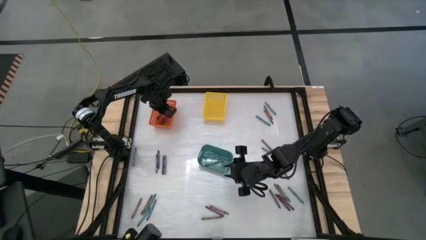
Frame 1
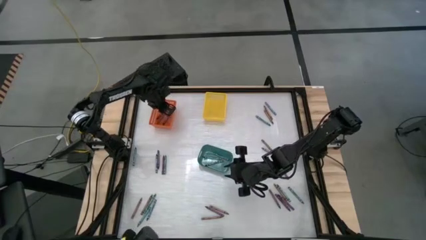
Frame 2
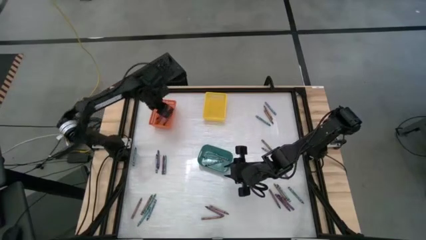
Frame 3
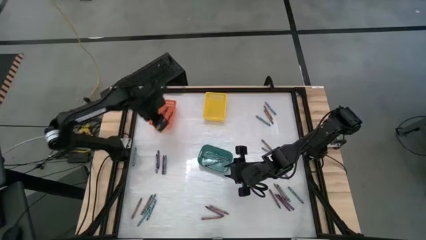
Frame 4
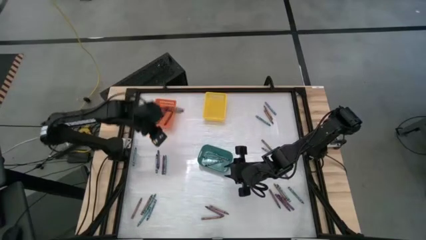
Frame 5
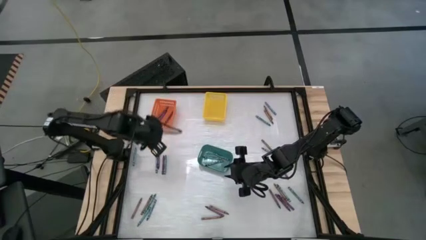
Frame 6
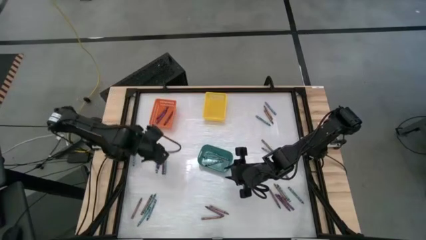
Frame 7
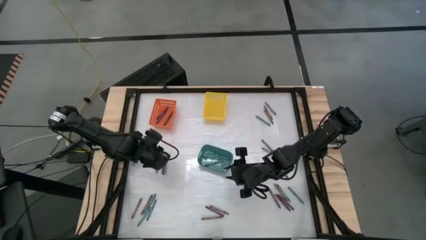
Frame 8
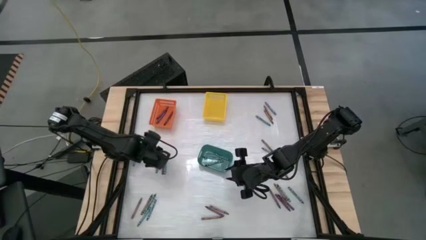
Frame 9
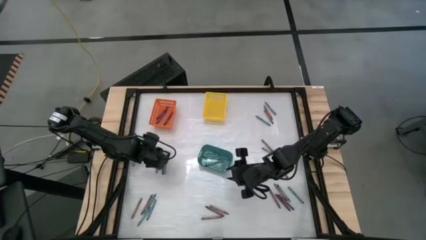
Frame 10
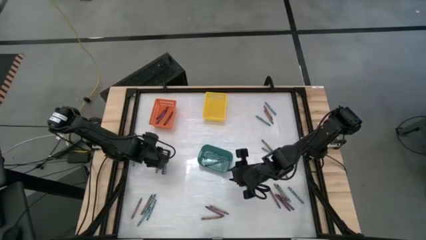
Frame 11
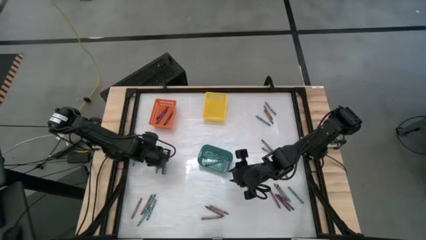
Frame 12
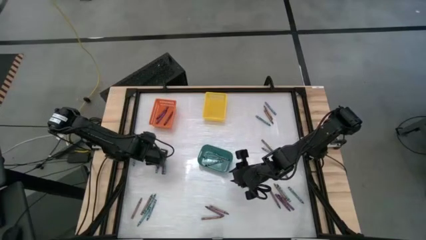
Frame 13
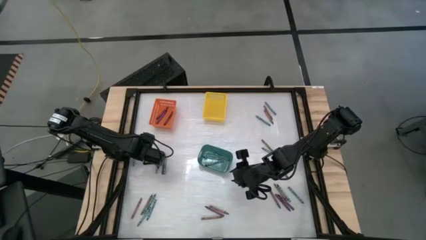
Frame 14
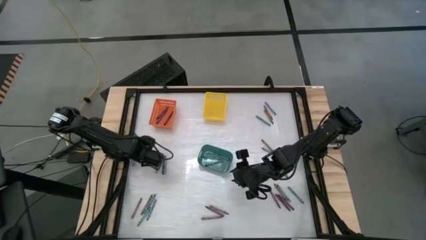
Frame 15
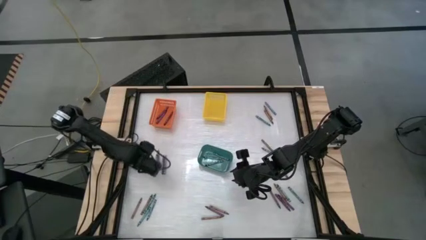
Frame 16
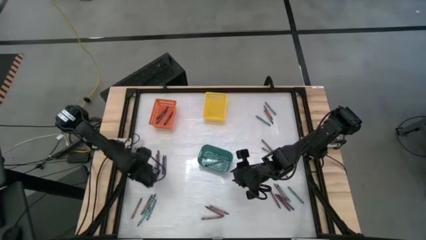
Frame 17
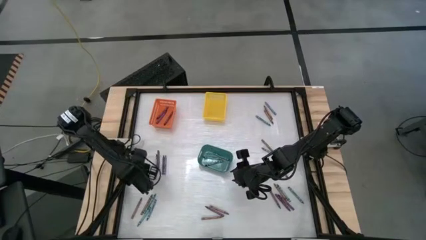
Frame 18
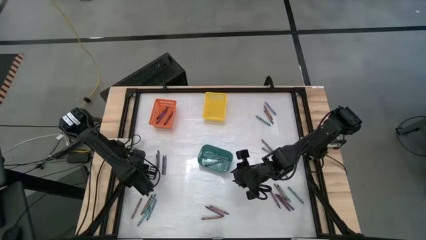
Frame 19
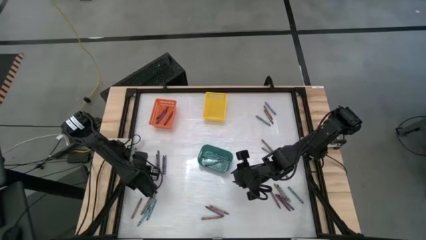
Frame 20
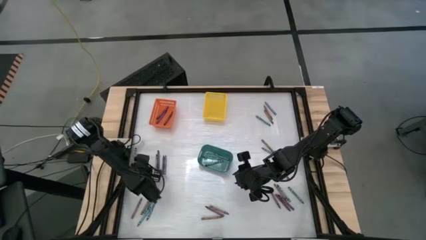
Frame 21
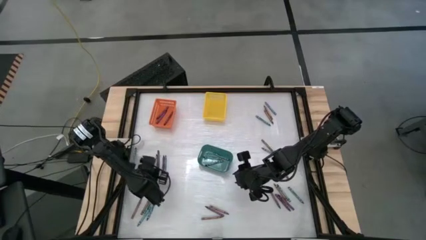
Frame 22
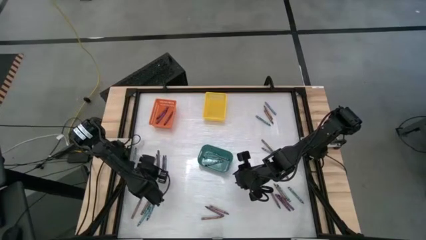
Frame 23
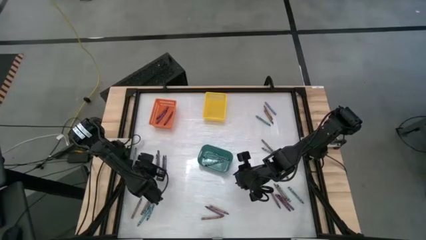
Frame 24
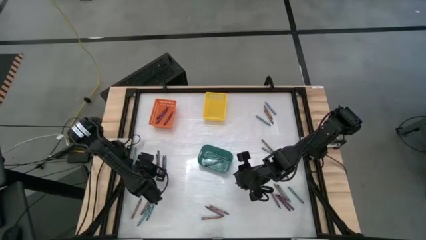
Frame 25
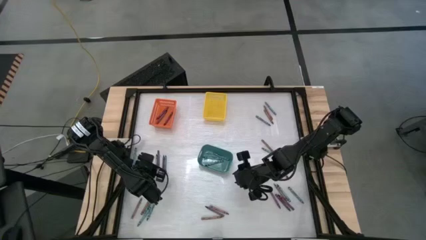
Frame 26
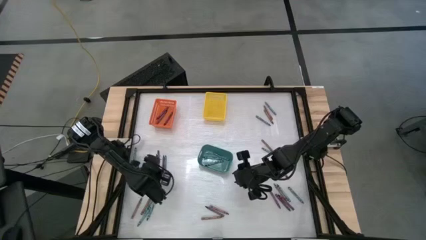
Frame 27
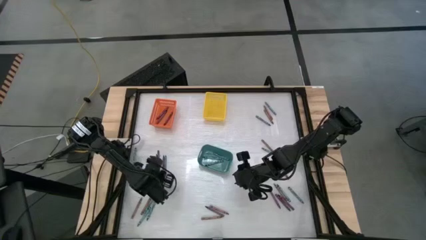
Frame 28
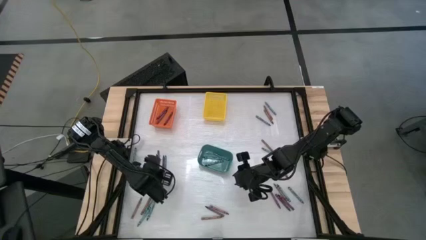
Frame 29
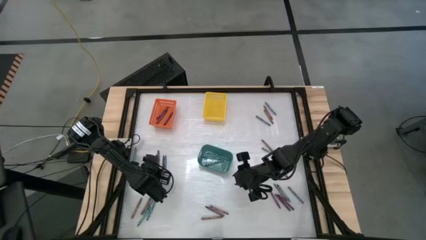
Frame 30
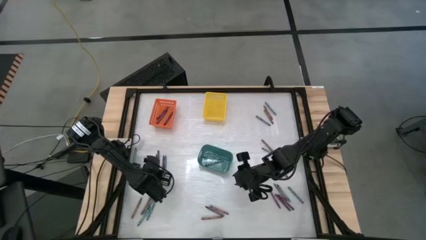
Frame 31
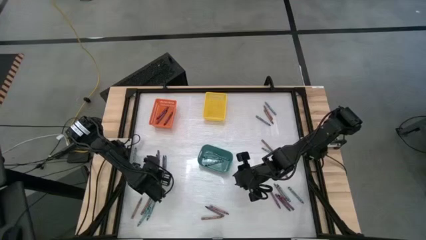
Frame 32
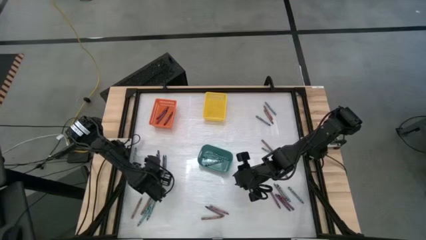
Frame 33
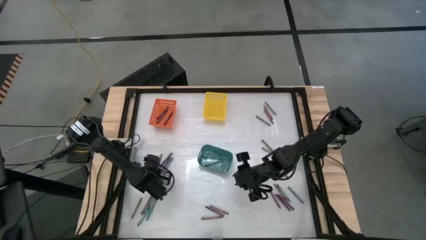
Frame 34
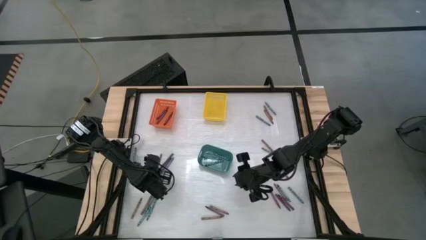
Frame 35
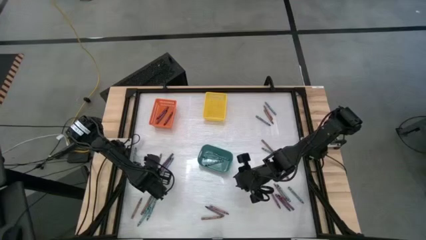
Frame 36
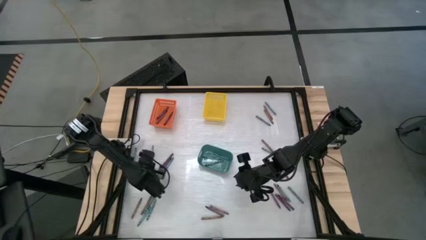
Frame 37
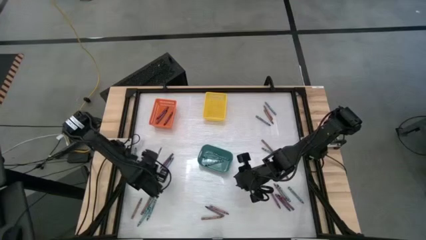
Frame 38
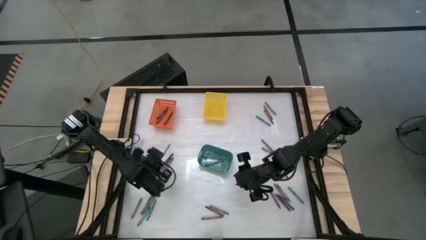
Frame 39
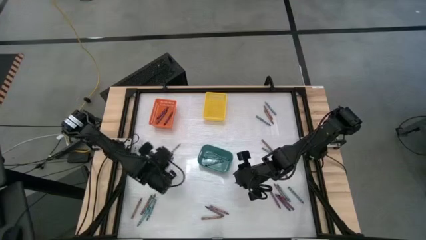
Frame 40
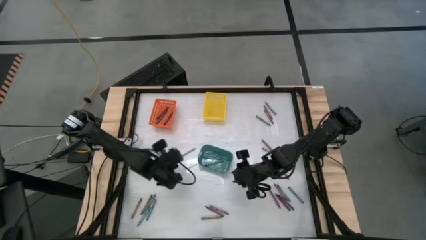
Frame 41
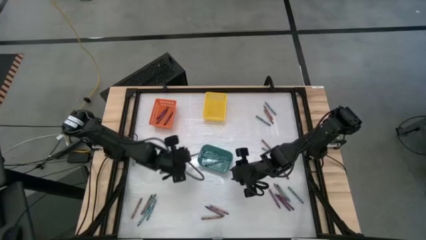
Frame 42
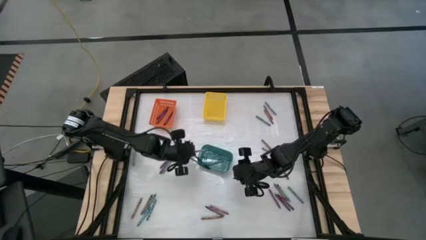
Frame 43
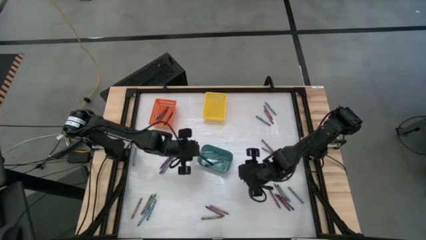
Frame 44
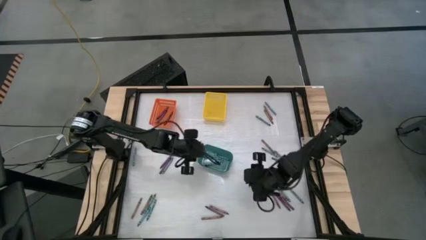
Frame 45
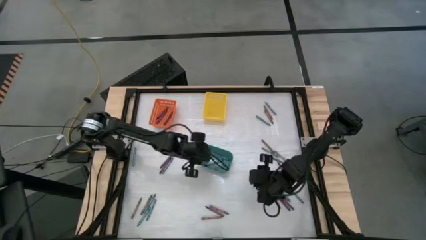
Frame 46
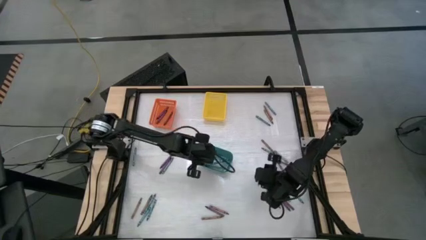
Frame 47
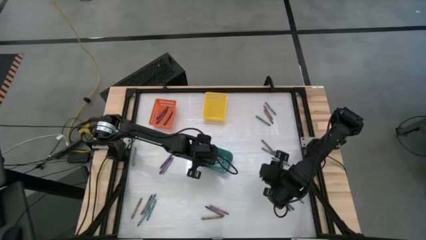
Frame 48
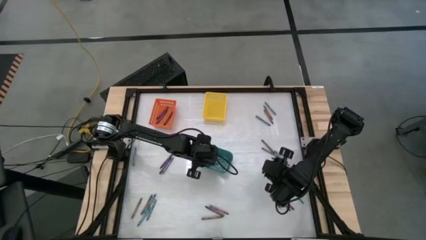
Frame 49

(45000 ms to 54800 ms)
Task: Sort crayons
Put the blue crayon into the blue bin

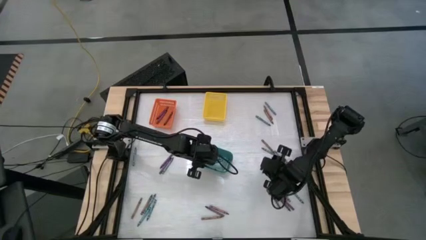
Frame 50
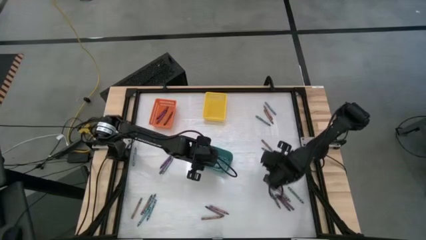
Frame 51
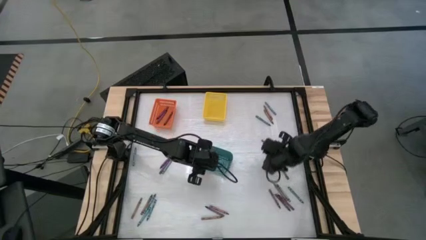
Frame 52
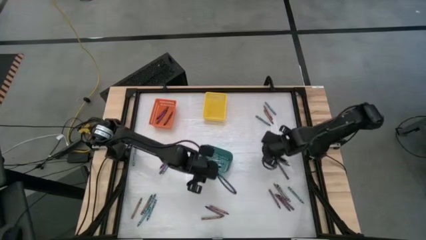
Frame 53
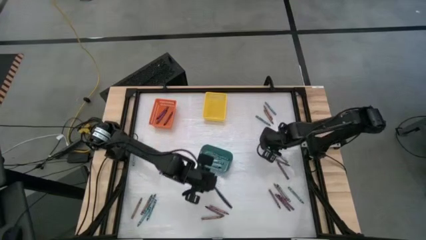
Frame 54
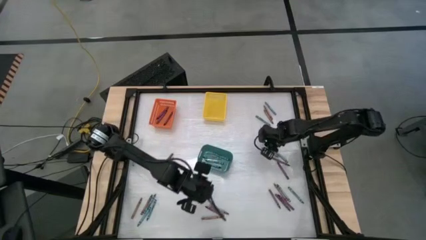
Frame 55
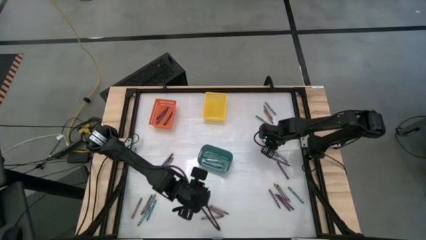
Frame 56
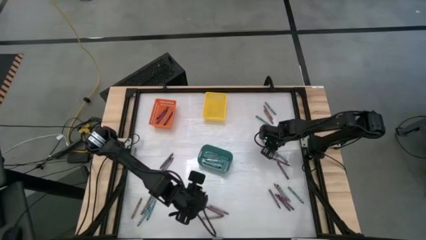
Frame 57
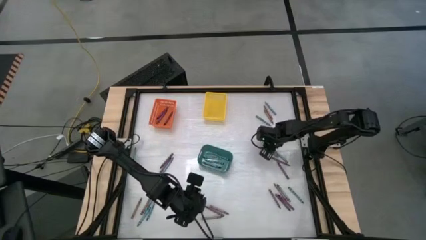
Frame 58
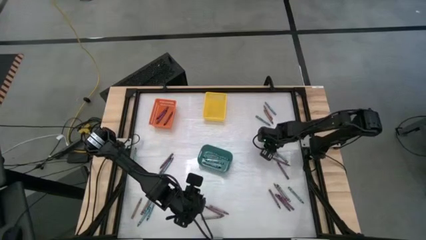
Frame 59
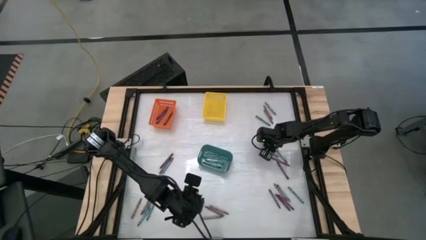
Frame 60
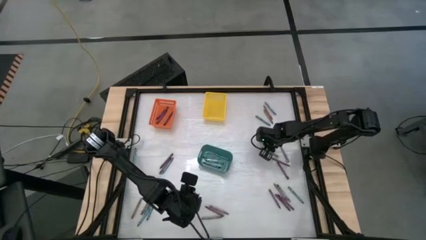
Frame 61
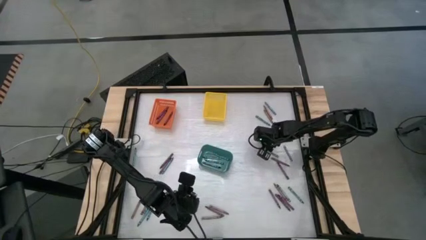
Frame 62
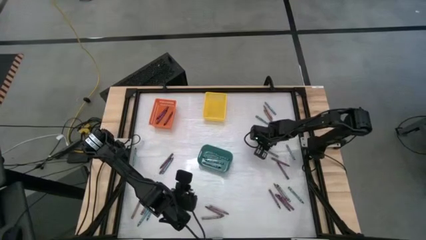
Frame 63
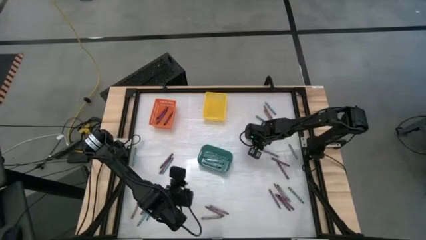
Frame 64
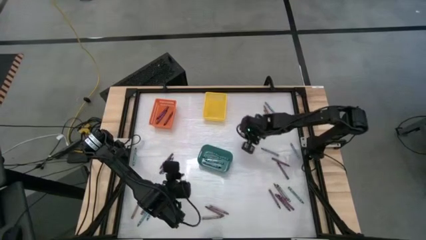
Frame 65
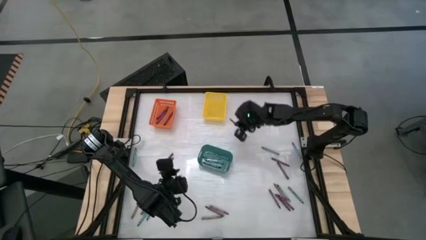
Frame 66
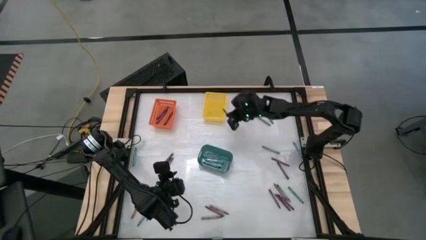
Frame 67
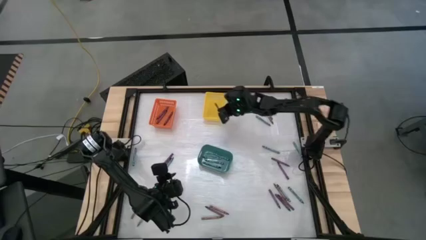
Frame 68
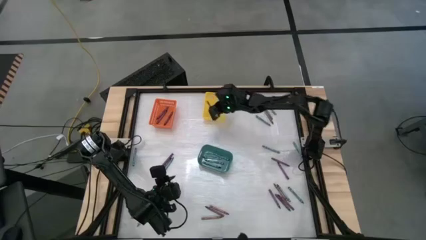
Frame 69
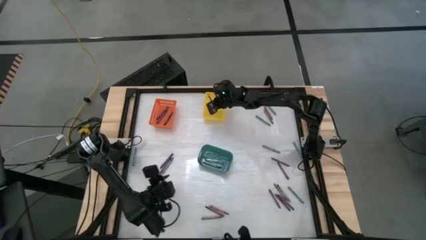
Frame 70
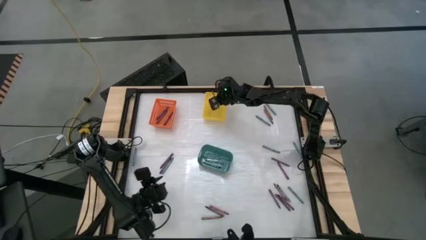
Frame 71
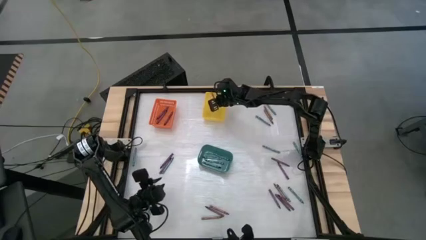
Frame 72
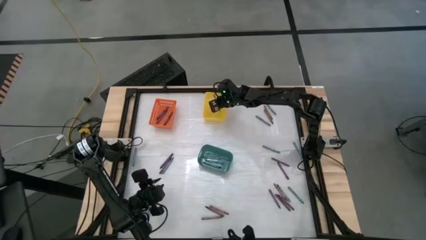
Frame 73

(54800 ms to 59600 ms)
Put the brown crayon into the yellow bin
